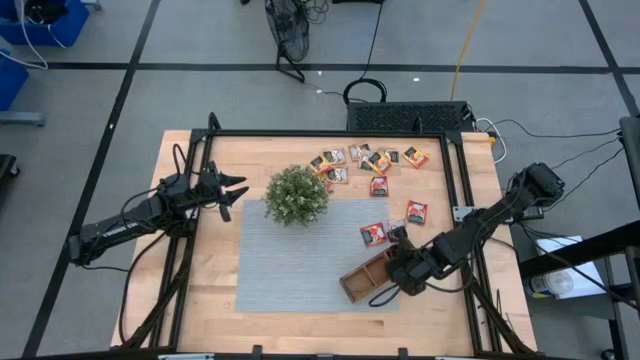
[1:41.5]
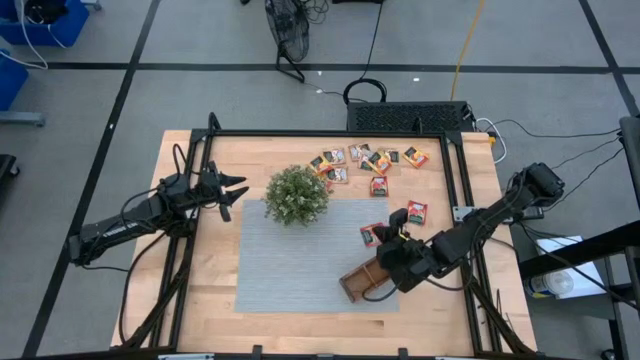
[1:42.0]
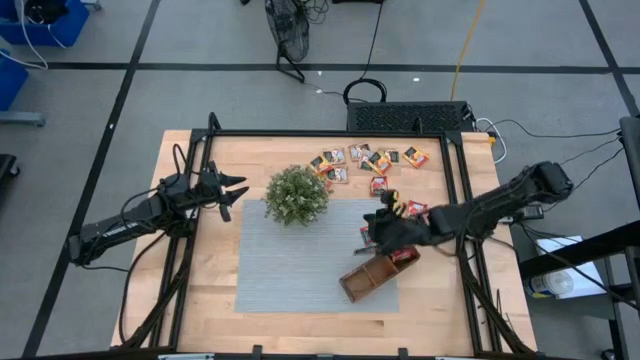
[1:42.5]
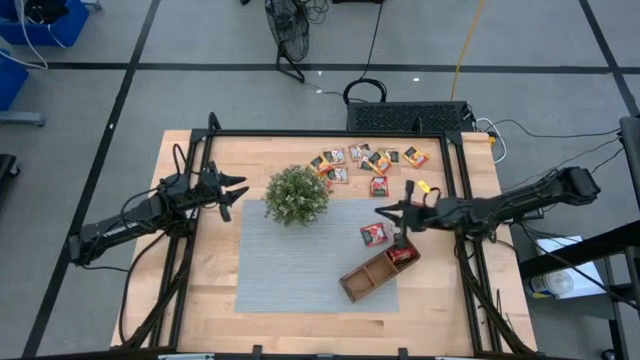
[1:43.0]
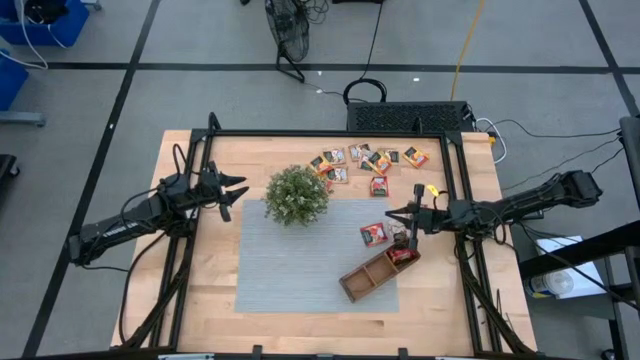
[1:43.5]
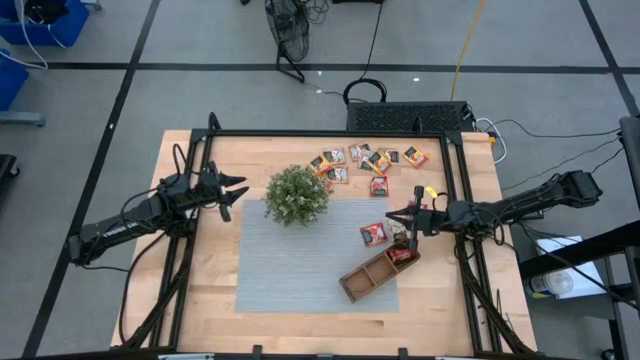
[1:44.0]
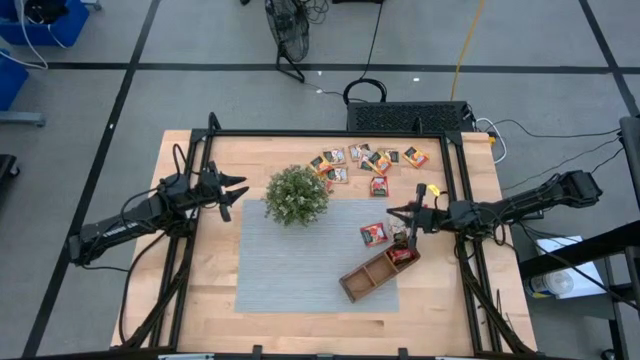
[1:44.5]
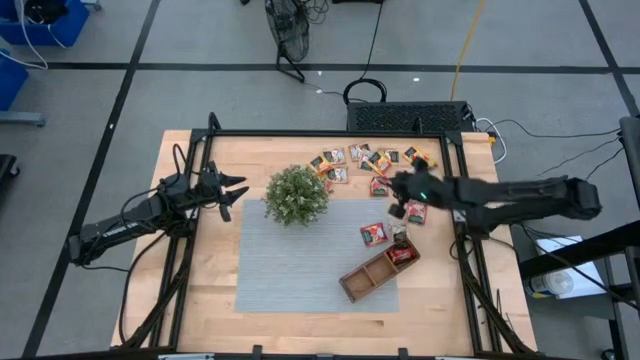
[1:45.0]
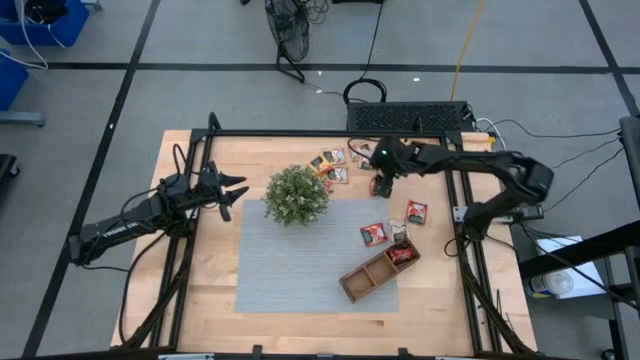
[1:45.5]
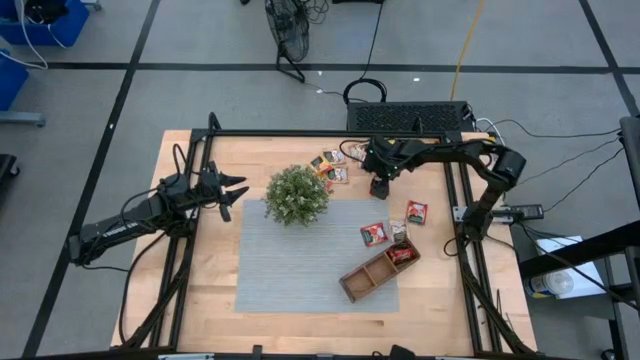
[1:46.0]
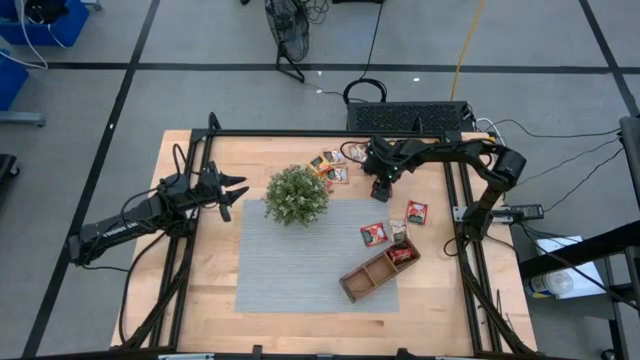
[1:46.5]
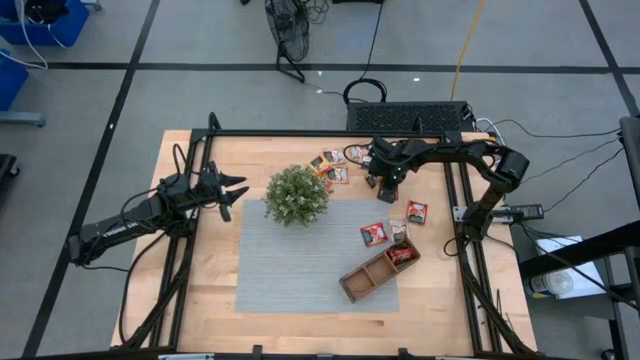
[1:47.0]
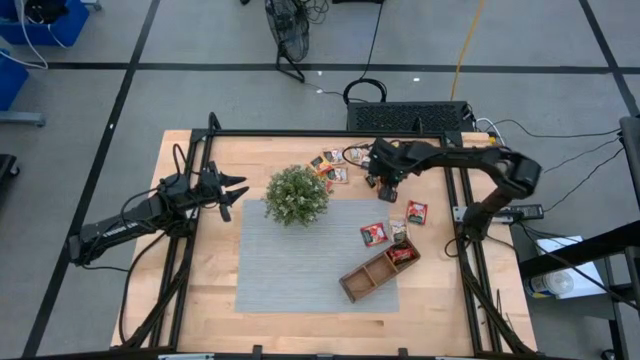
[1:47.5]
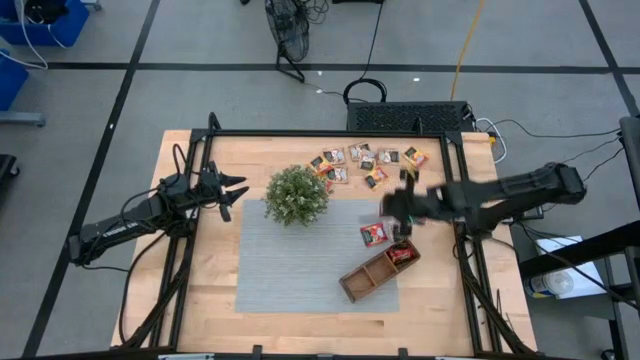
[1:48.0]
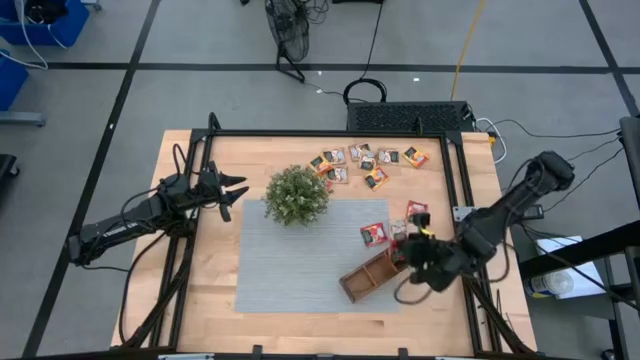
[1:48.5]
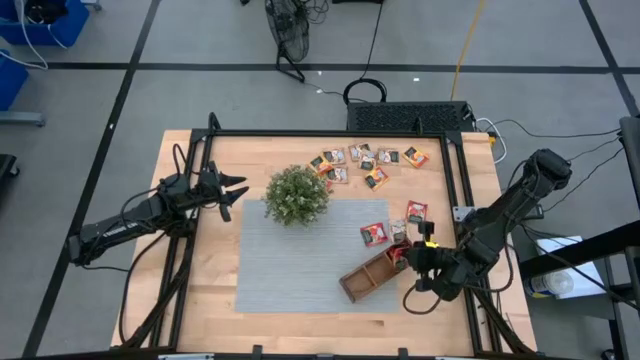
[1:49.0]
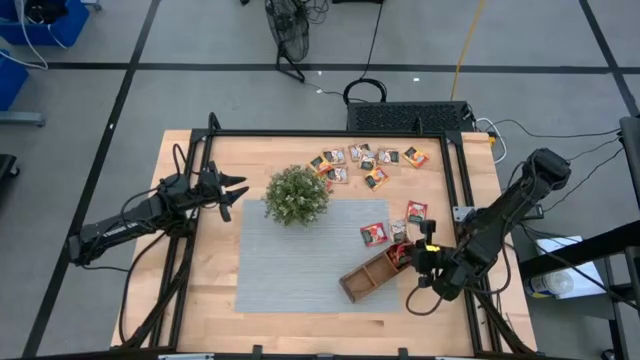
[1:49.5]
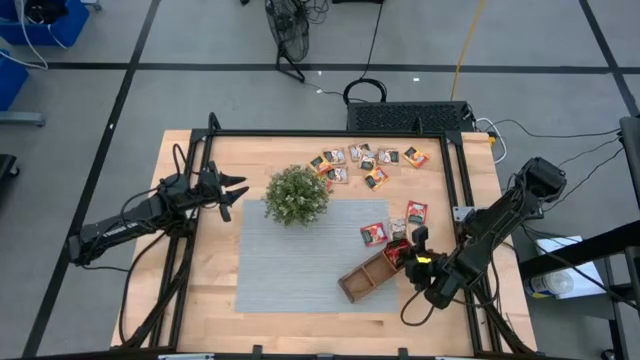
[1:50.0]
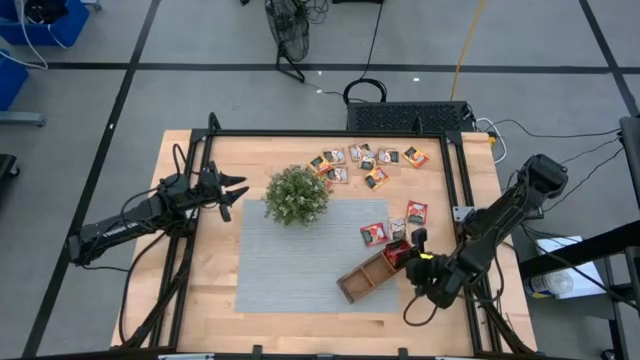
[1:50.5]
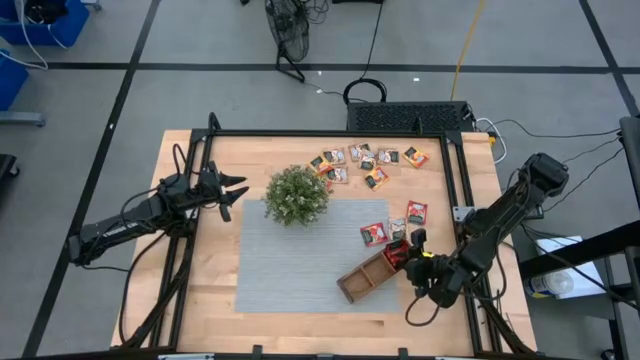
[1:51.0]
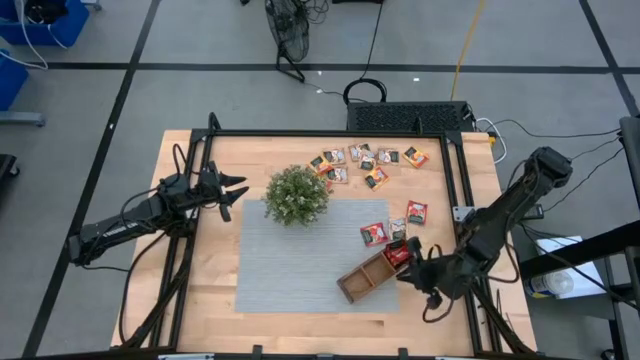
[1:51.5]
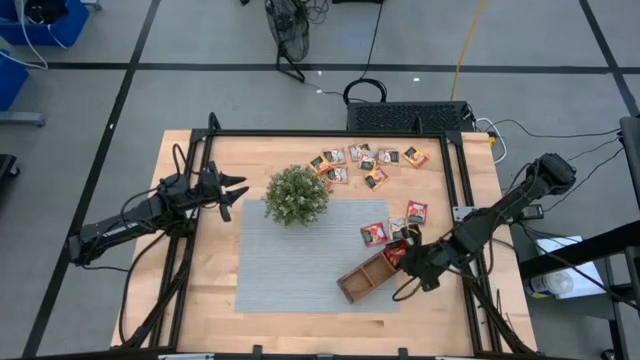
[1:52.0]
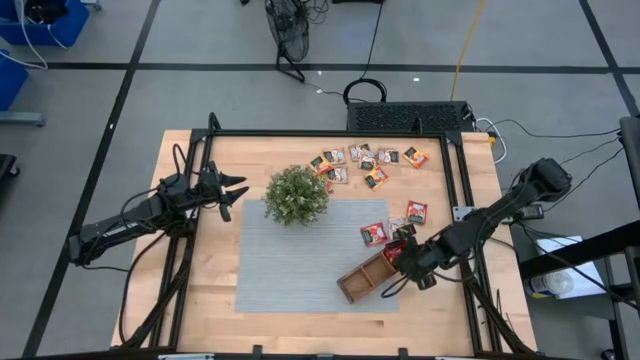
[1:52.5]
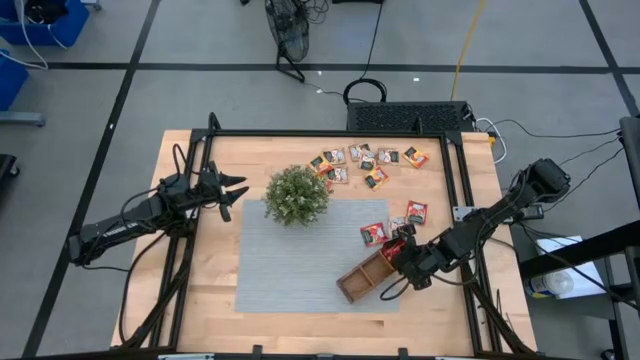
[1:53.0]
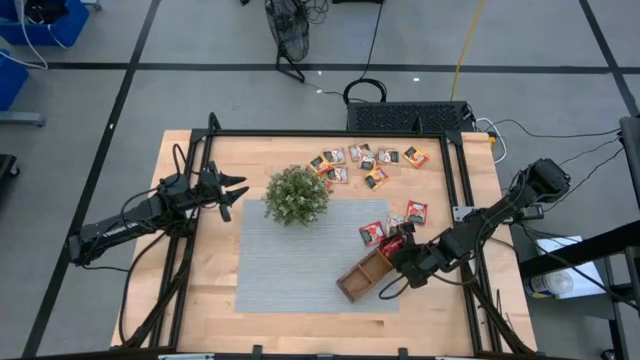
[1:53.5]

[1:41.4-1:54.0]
Task: Pick & Place Tea
Put the strawberry tea sachet into the brown organizer

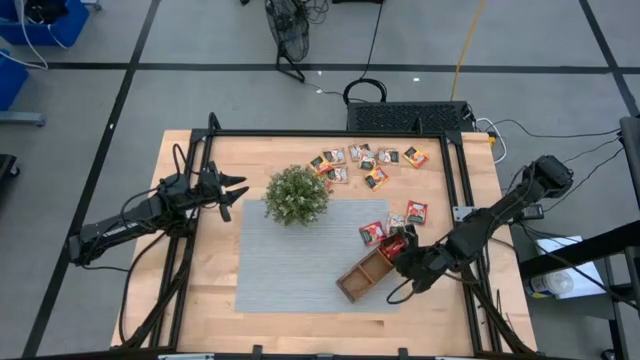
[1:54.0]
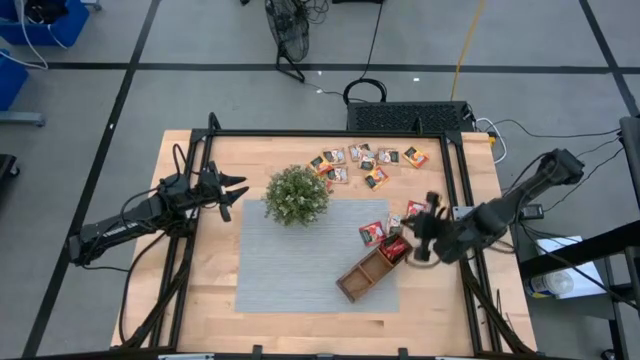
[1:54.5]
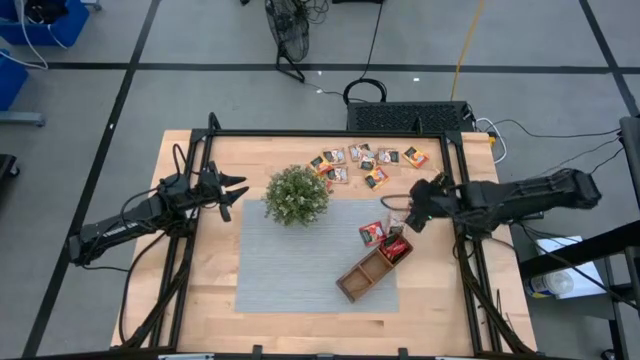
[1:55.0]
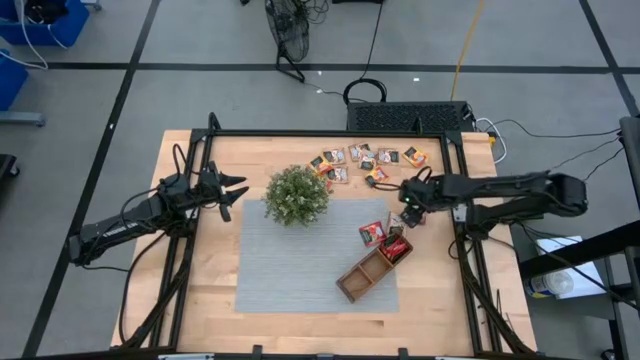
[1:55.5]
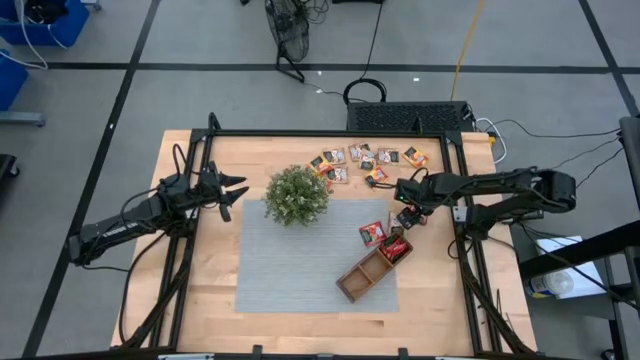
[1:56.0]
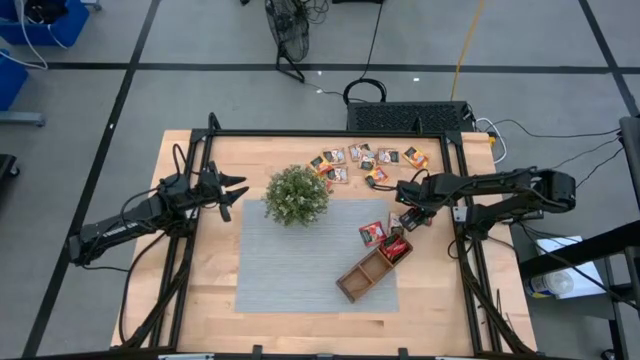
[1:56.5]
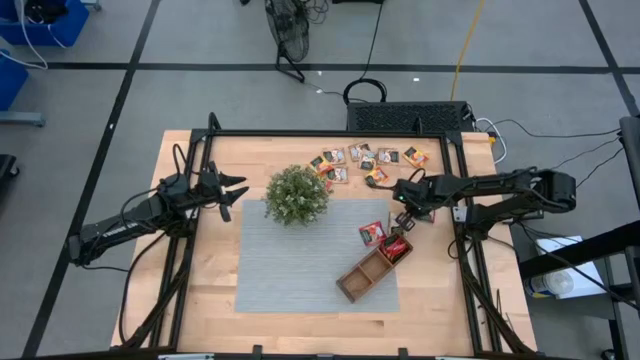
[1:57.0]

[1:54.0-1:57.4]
Put the strawberry tea sachet into the brown organizer

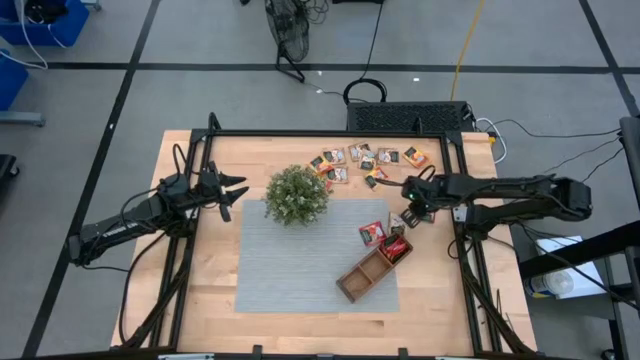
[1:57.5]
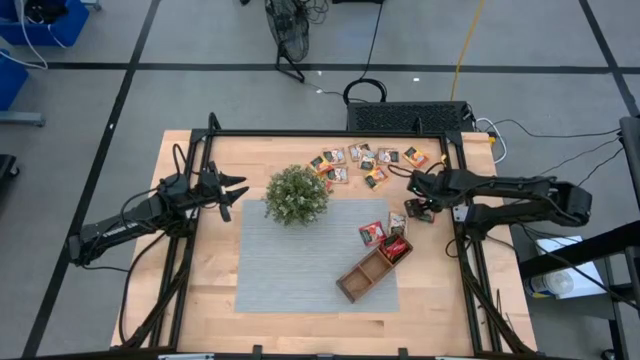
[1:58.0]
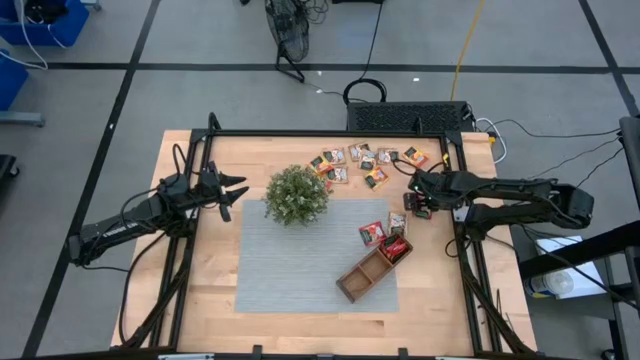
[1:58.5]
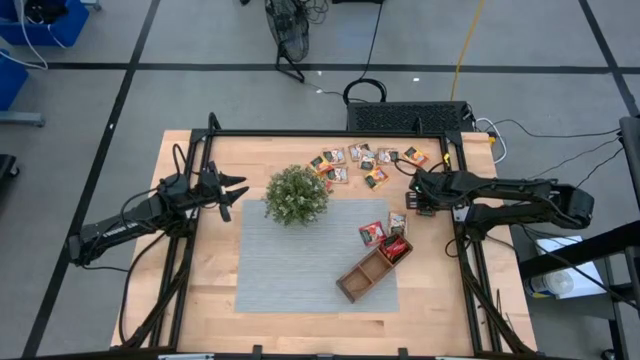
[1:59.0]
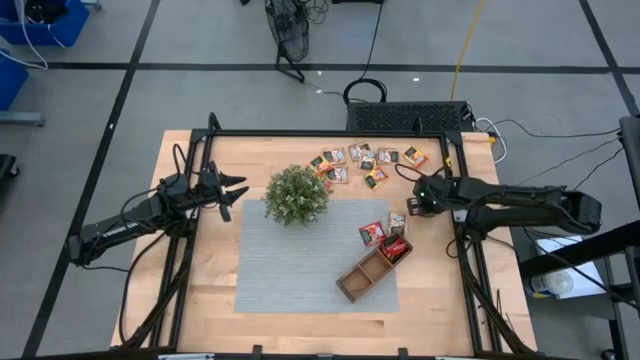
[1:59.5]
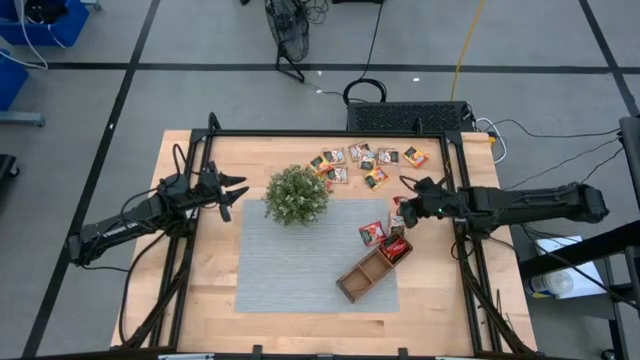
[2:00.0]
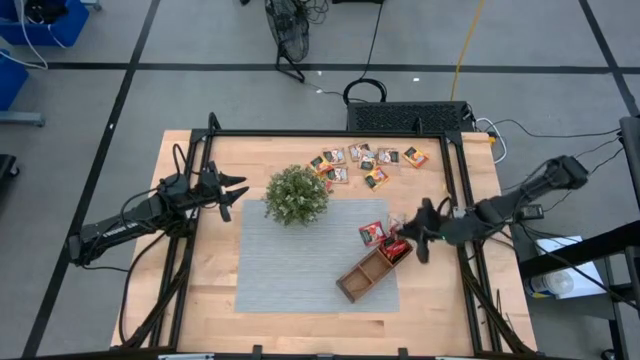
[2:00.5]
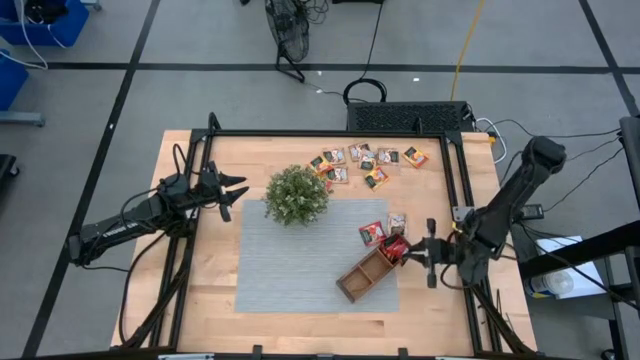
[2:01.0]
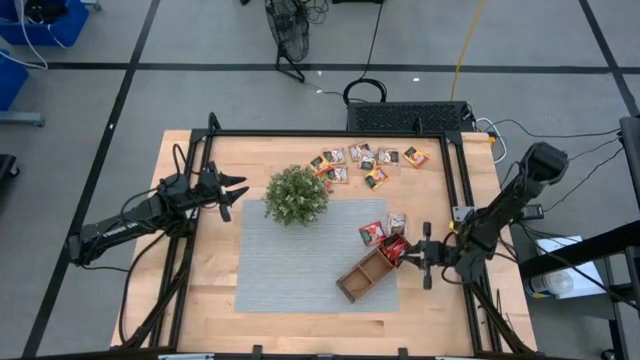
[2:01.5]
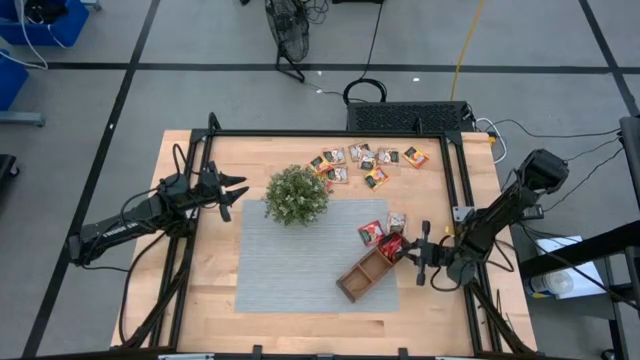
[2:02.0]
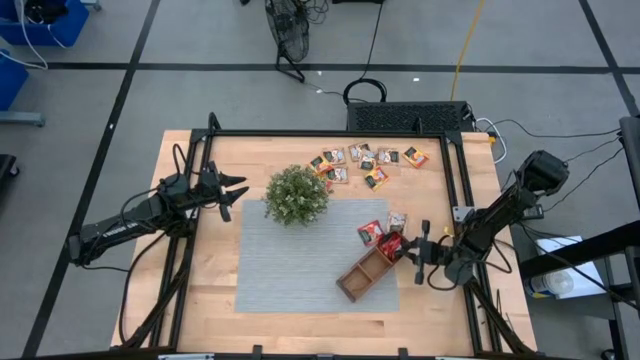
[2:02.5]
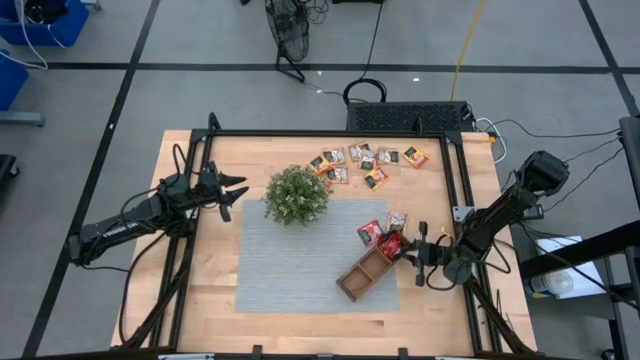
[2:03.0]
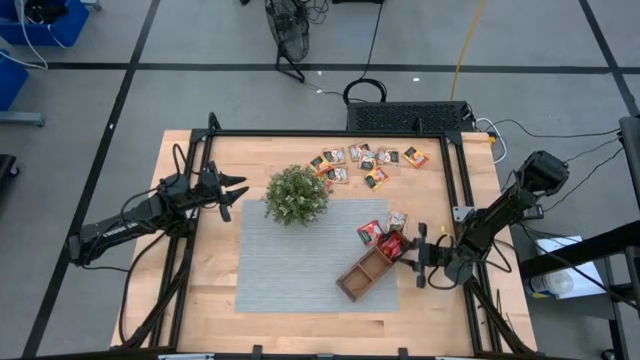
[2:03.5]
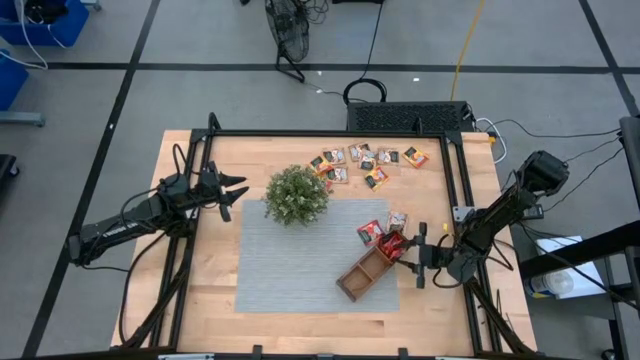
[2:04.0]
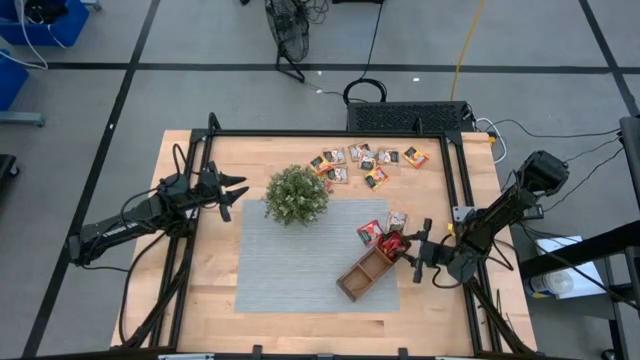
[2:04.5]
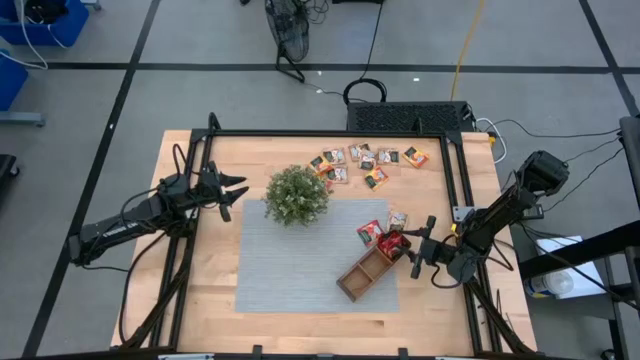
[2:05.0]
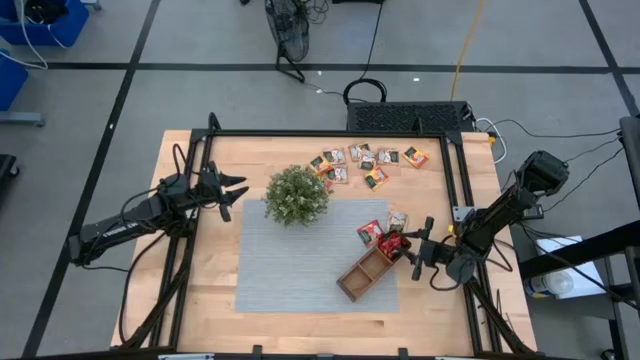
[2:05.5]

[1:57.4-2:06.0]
Put the strawberry tea sachet into the brown organizer
